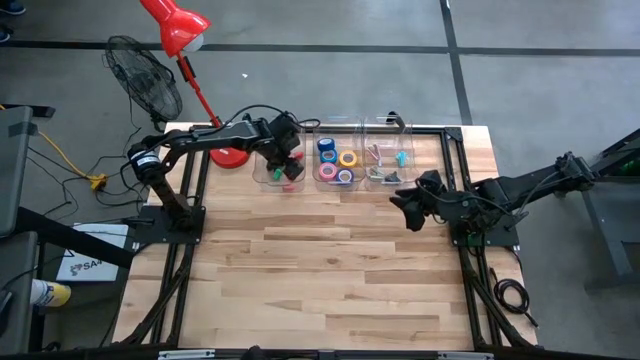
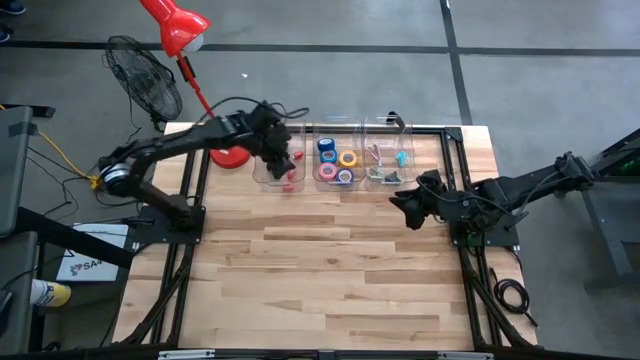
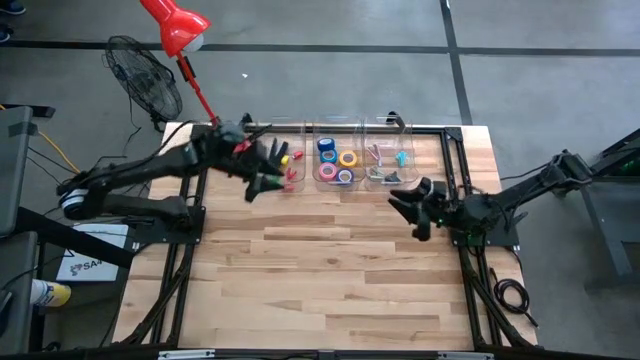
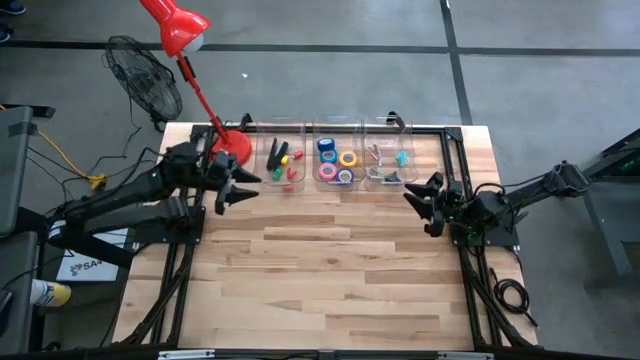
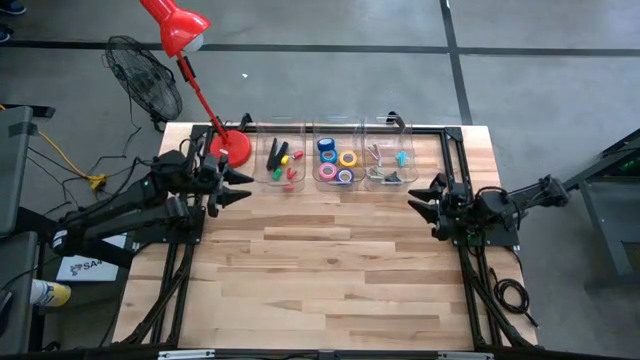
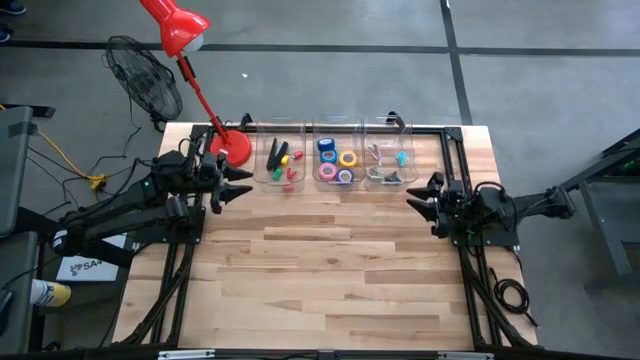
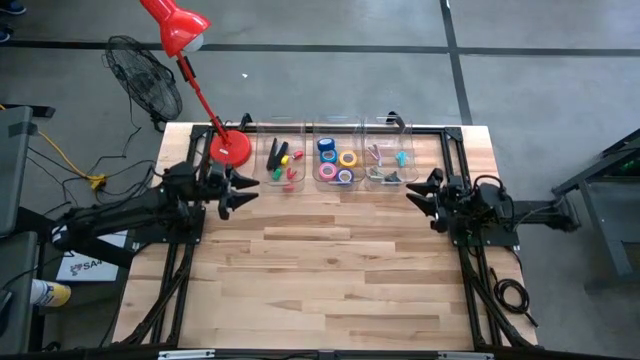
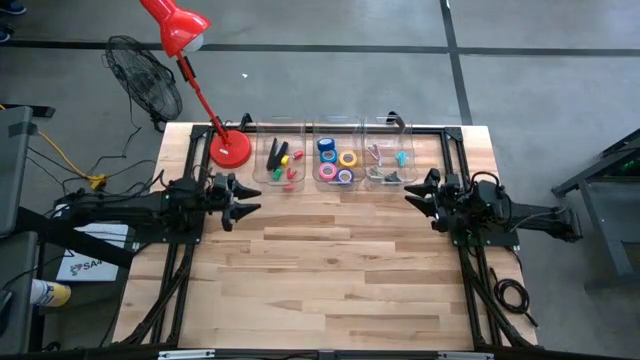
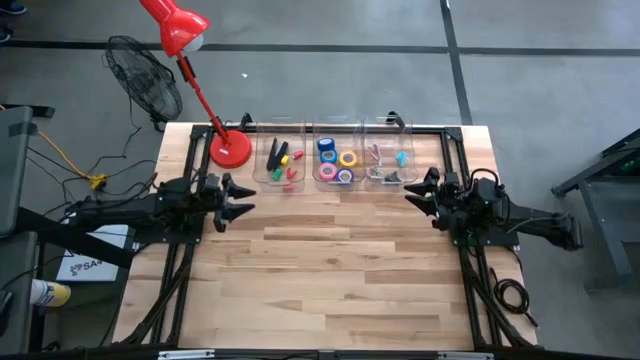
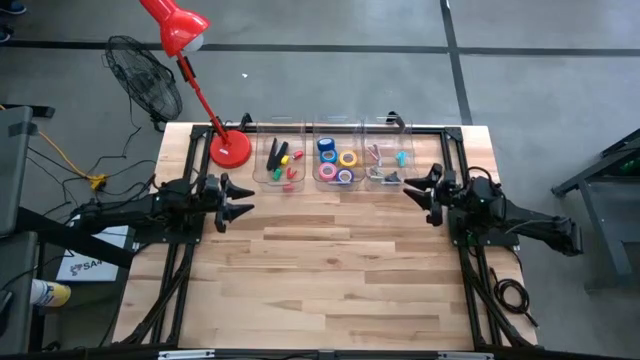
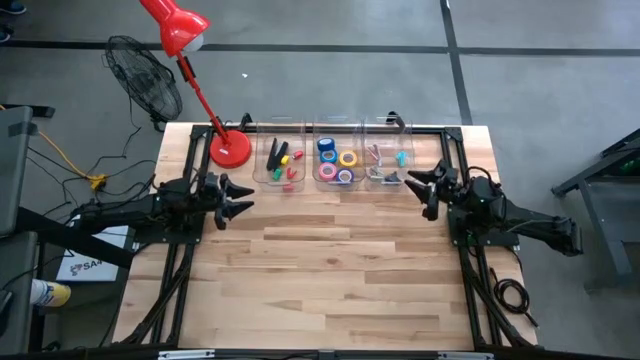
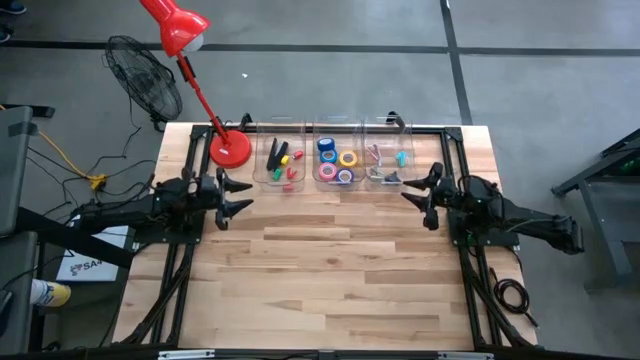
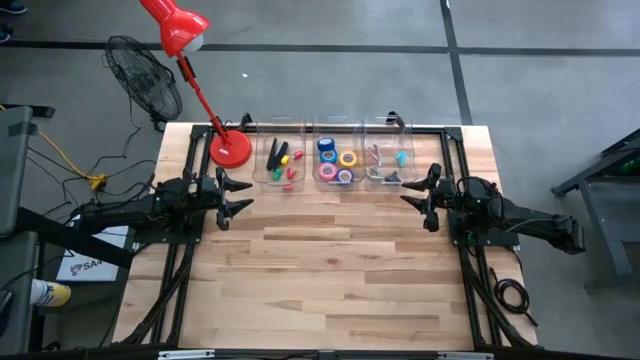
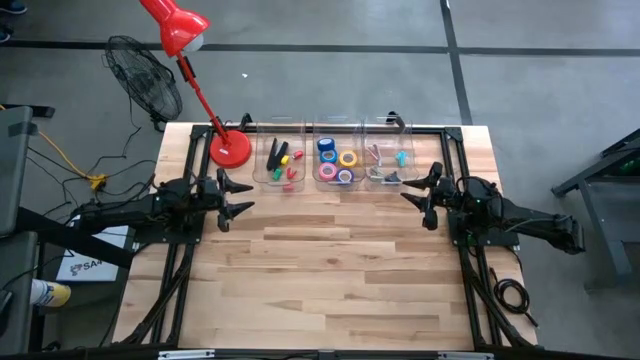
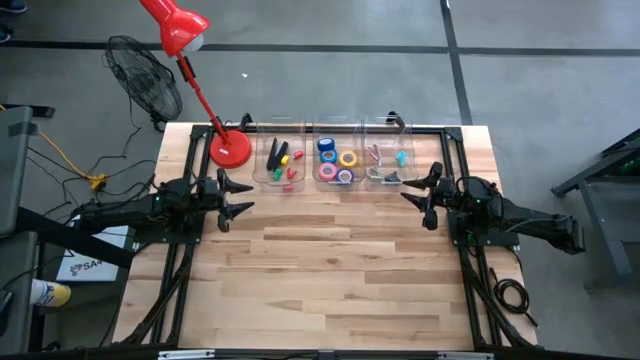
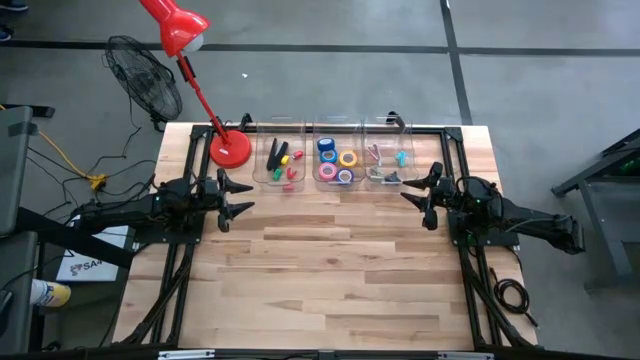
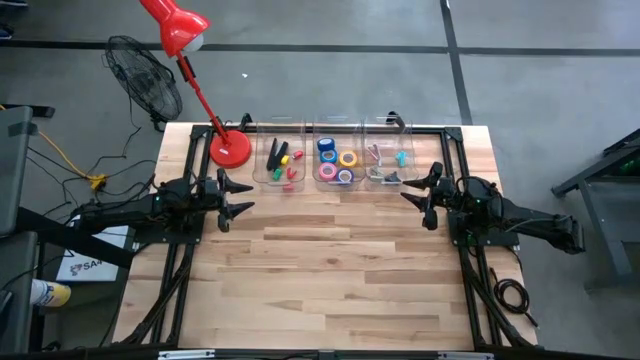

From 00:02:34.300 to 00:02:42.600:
Task: Pick and place Stapler, Stapler remover, tape
Return to Home Position

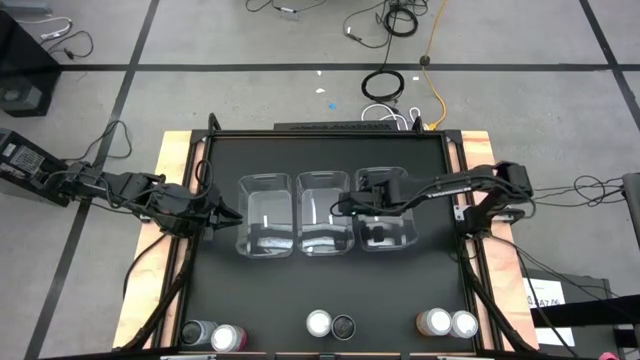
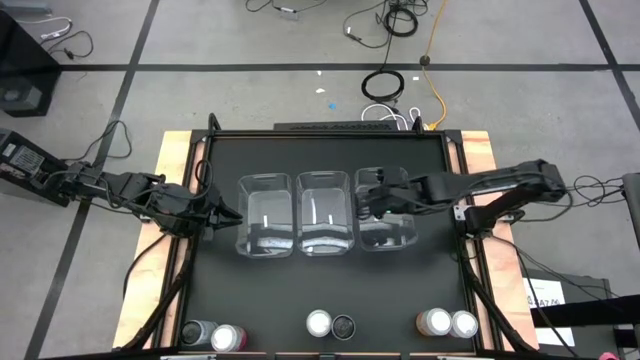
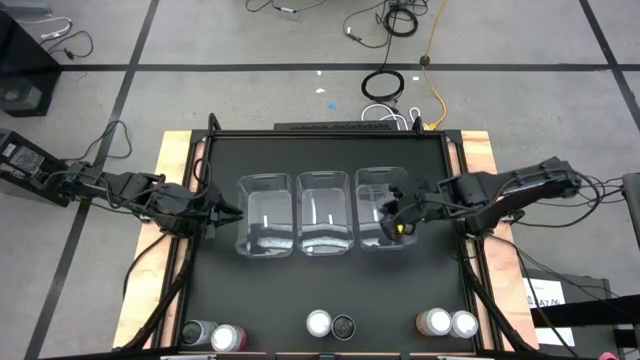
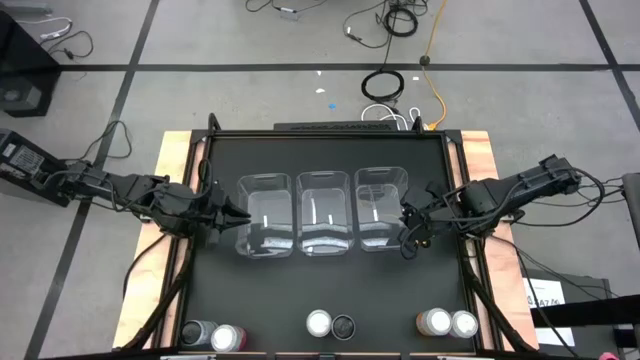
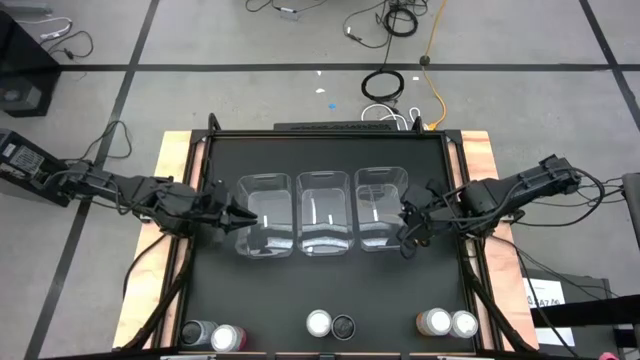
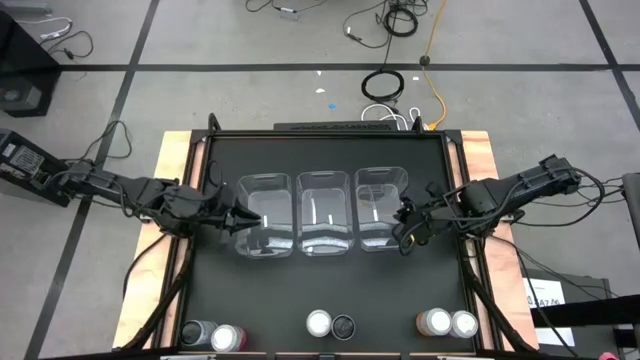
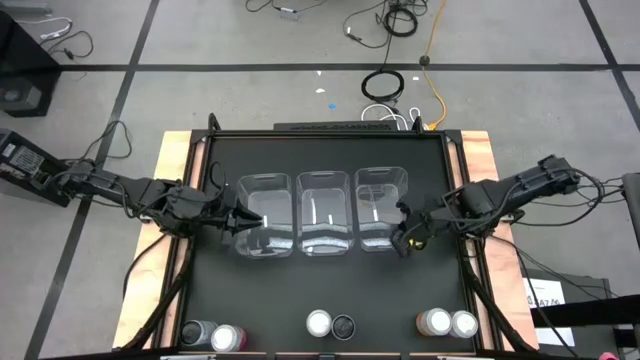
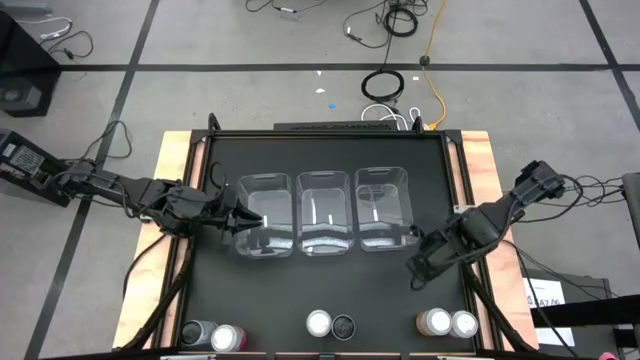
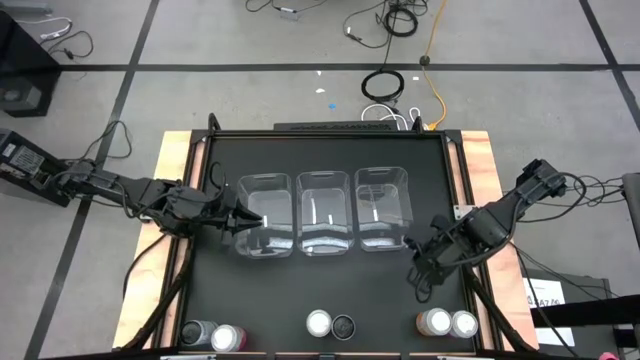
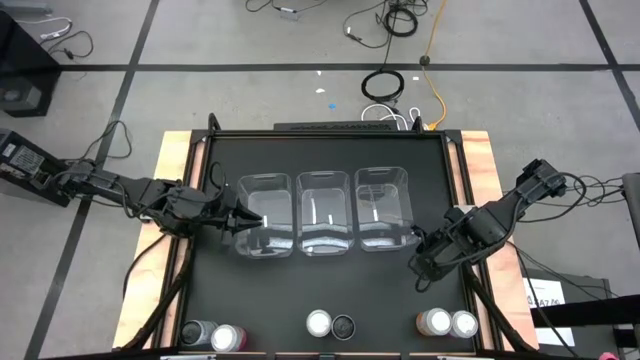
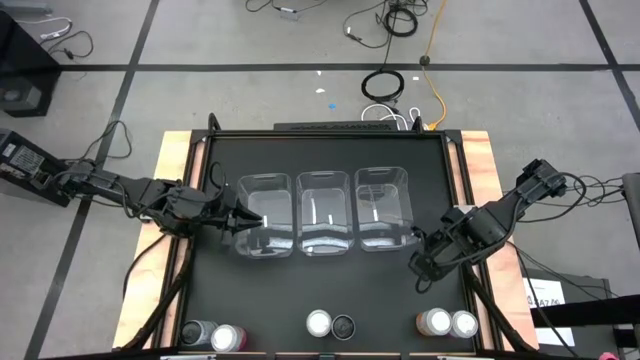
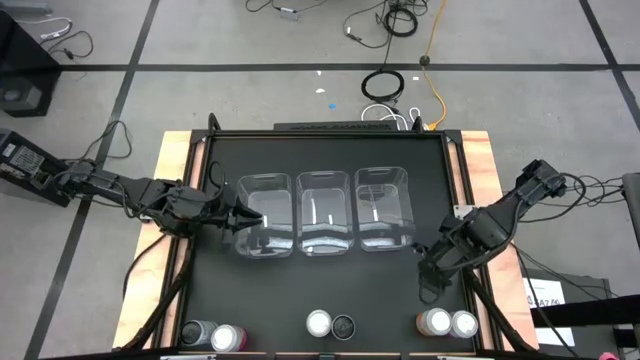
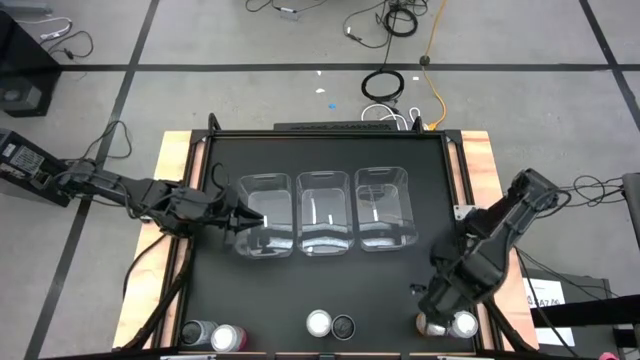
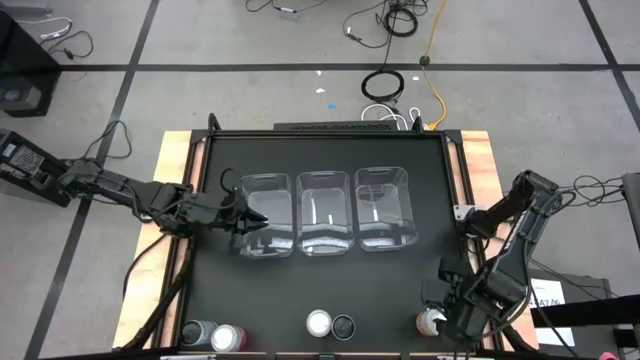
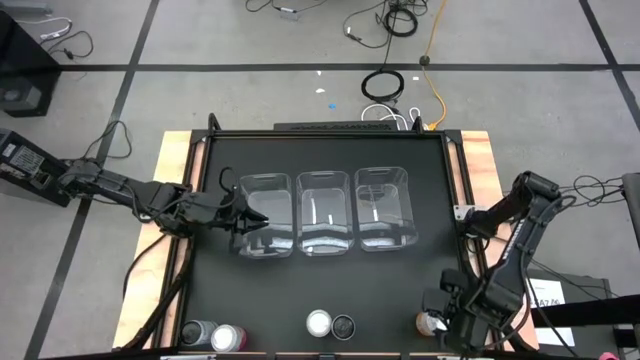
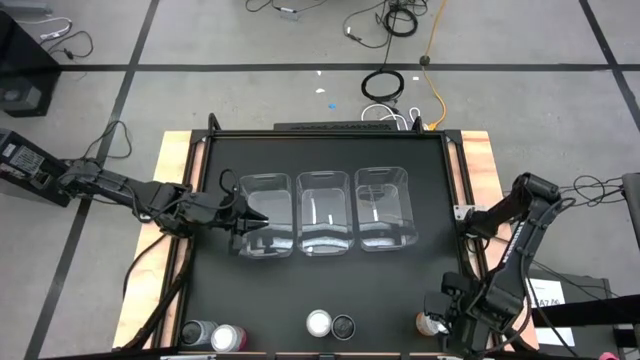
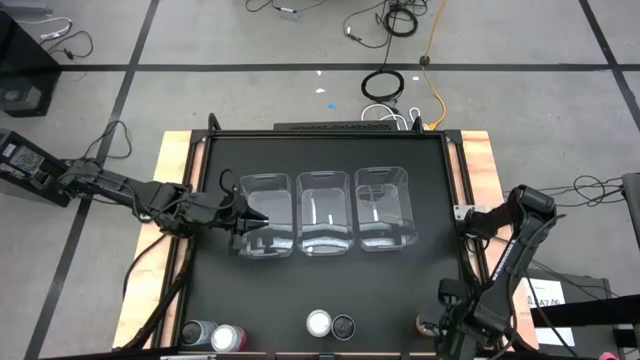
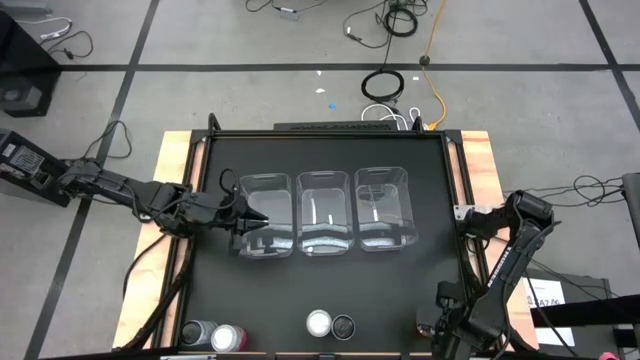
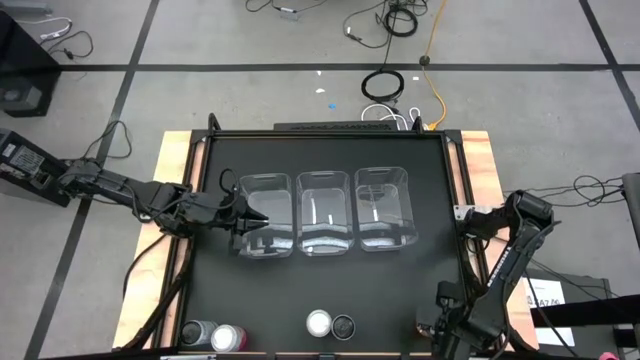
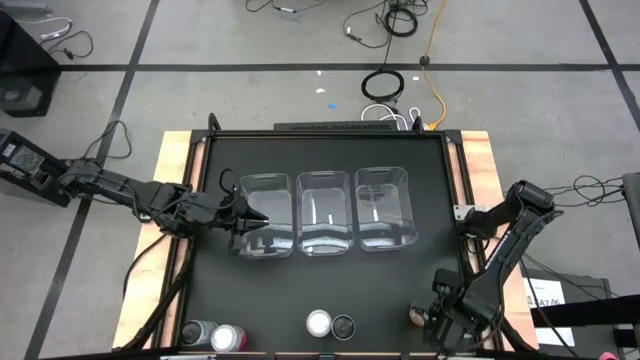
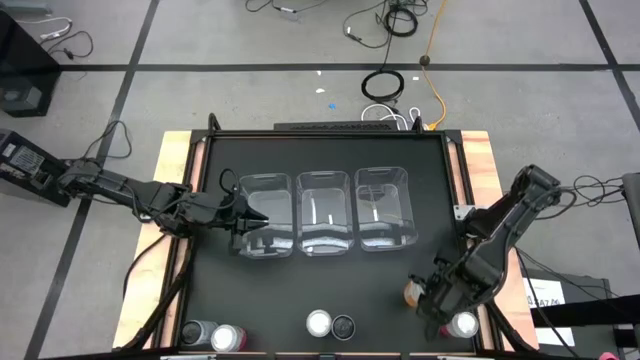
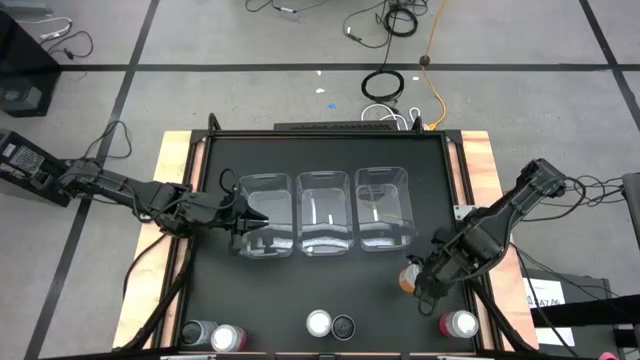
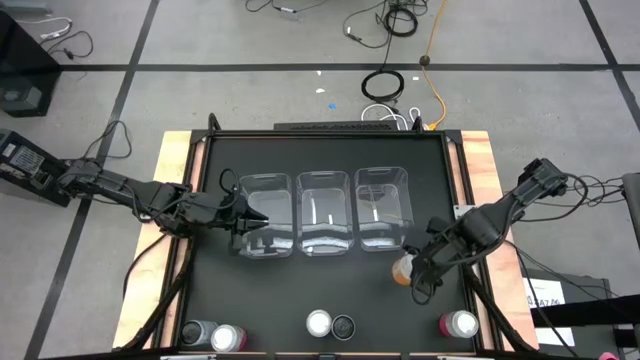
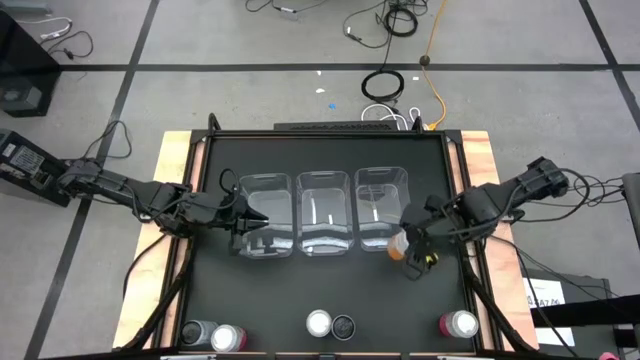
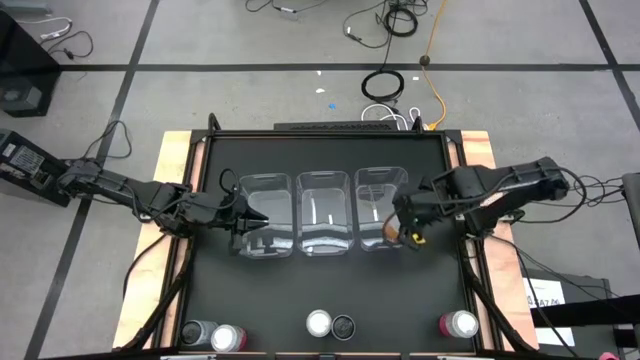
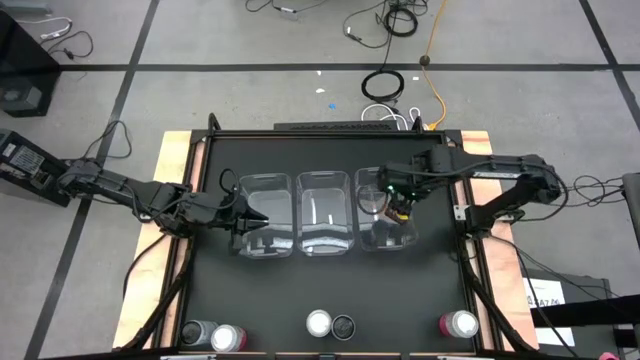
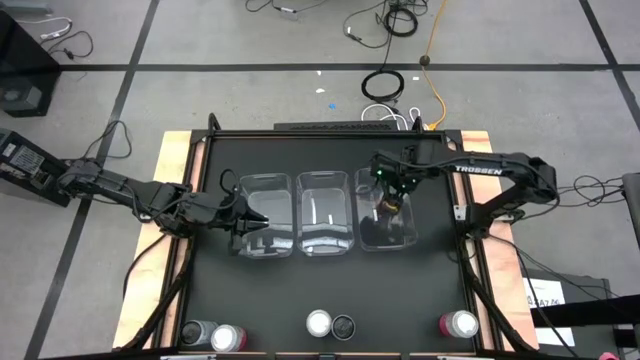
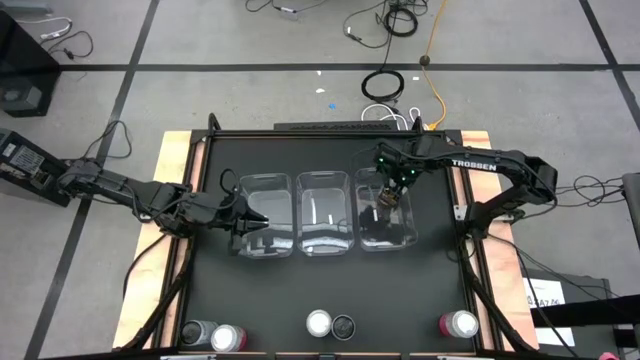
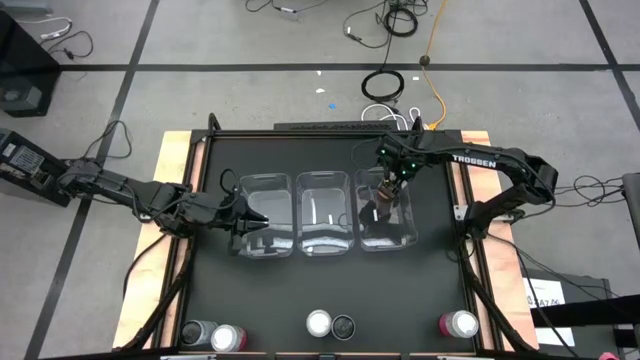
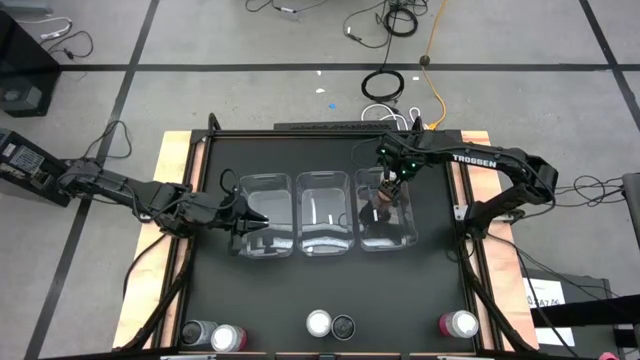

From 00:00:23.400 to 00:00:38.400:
Task: Sort soda cans
Put the right orange soda can into the right transparent bin
